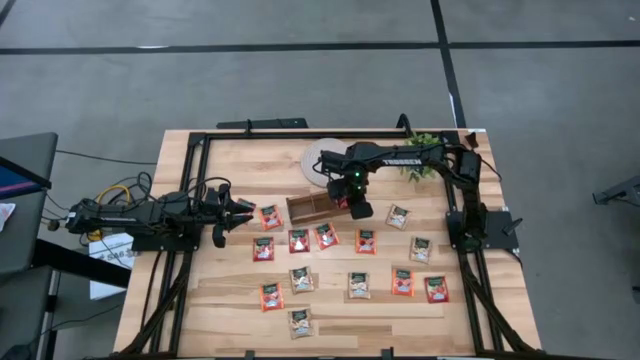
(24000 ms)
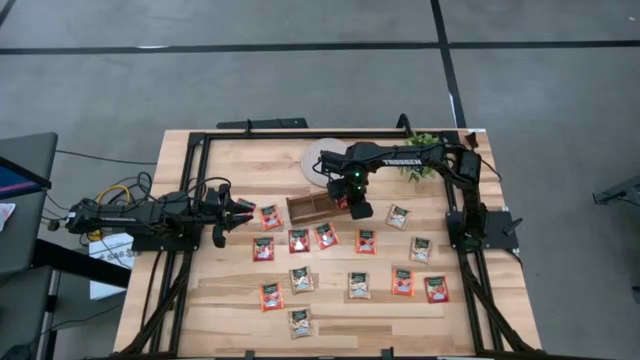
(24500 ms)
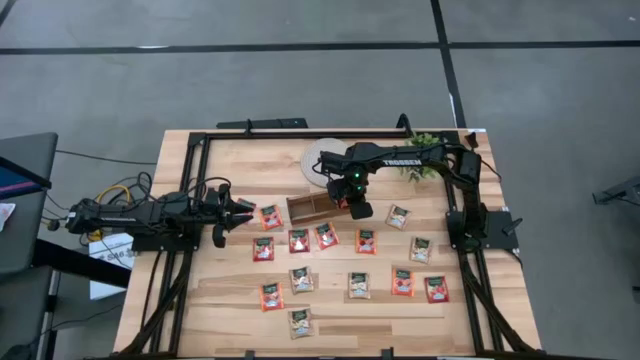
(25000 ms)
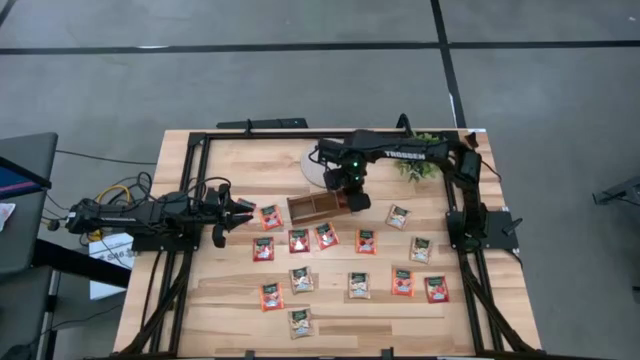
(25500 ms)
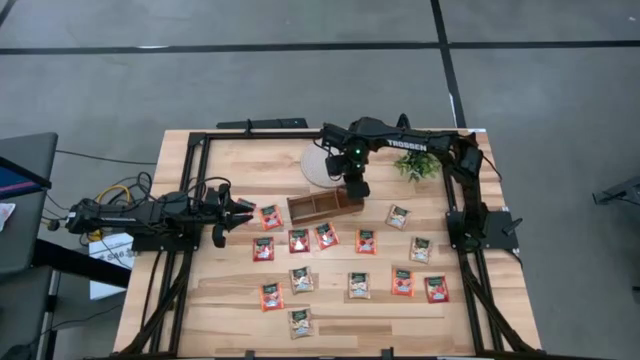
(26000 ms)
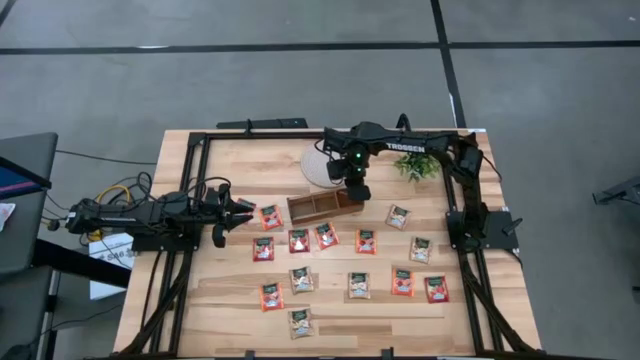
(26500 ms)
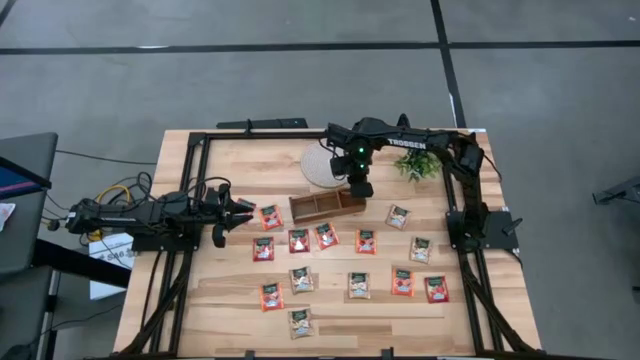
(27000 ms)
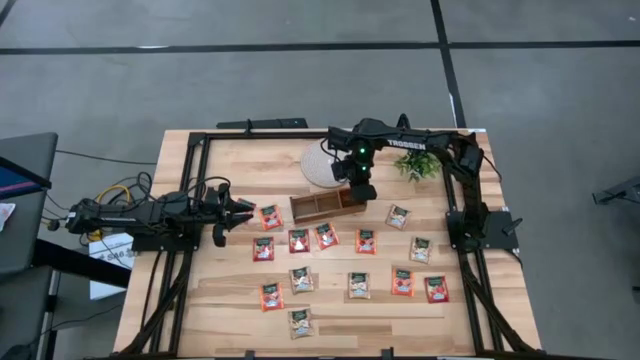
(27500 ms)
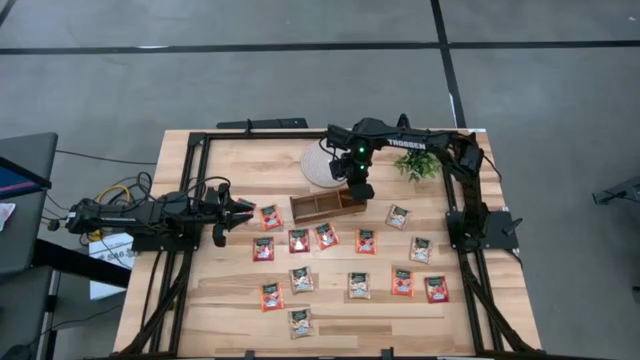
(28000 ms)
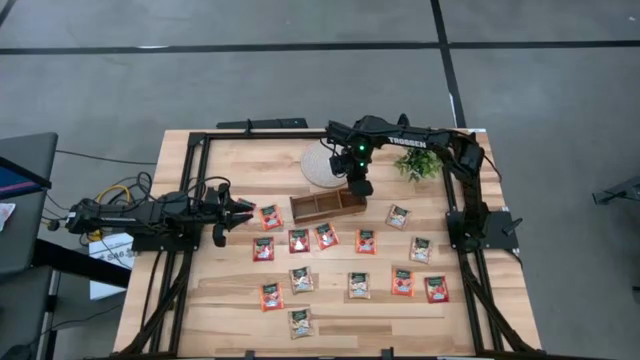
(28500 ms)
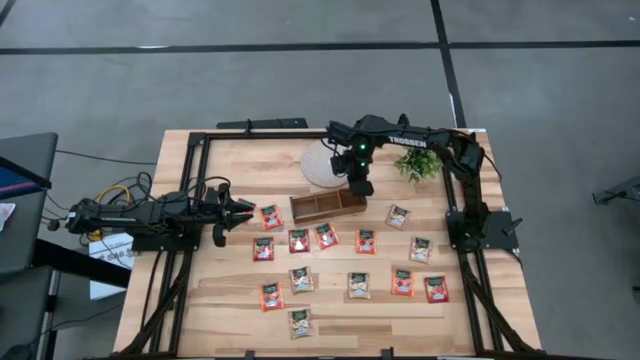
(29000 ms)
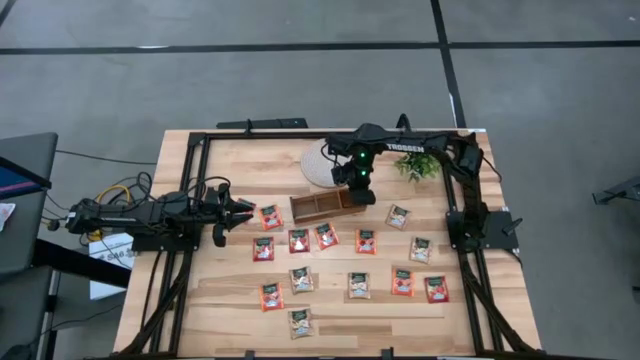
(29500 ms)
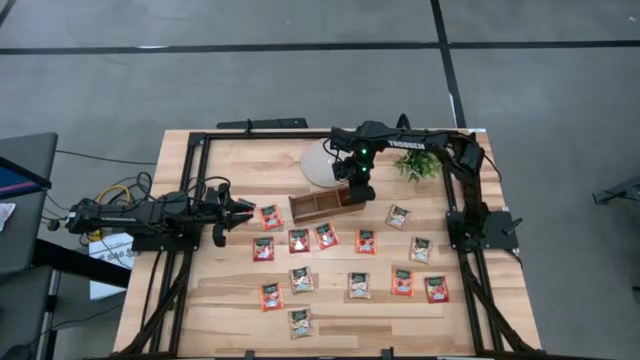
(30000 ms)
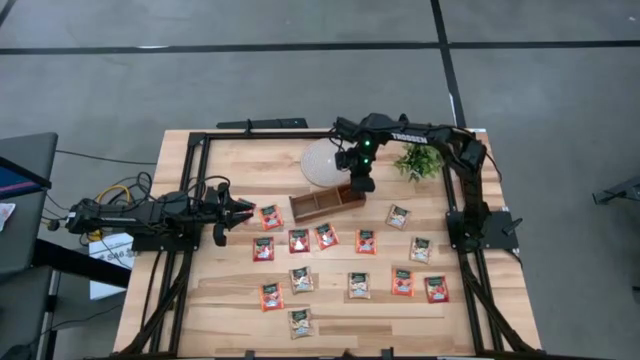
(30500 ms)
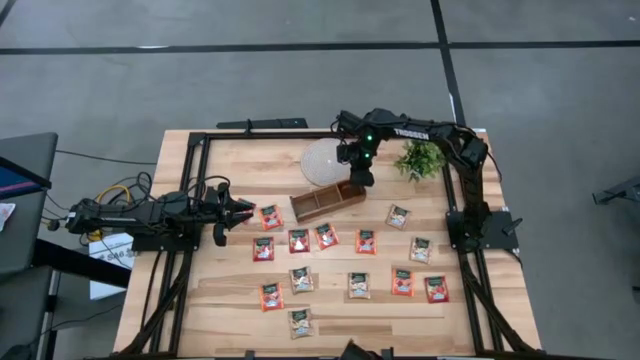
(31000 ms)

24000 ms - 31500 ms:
Task: Pick & Place Tea
Put the red tea bag into the right slot of the wooden organizer

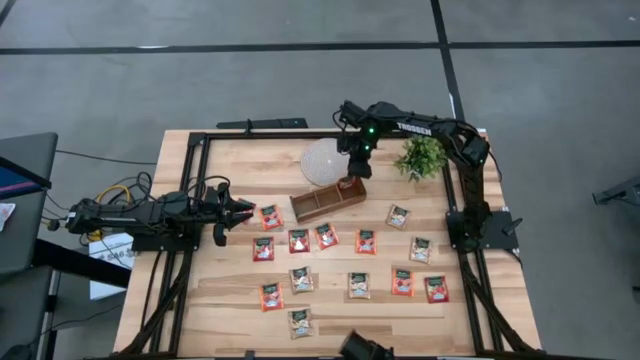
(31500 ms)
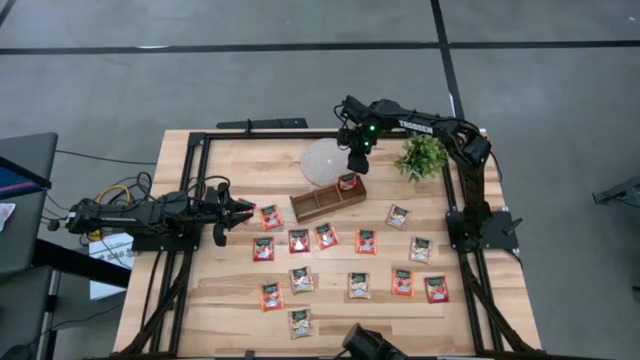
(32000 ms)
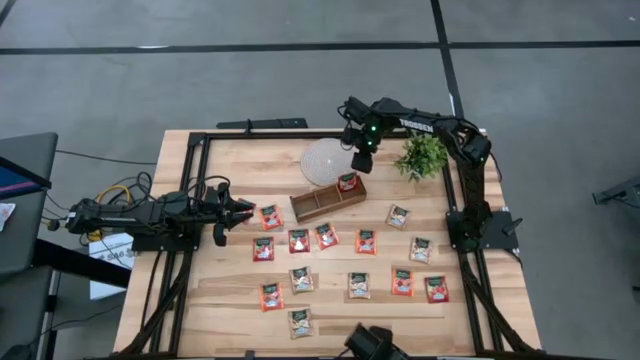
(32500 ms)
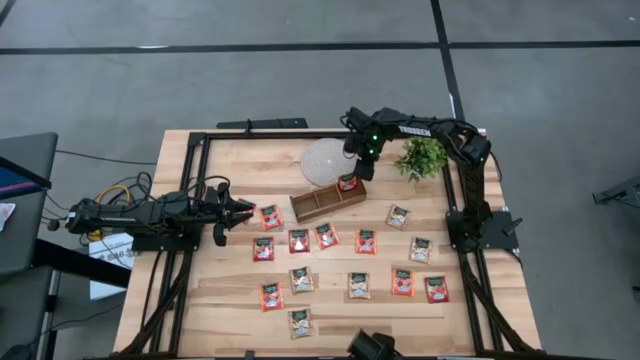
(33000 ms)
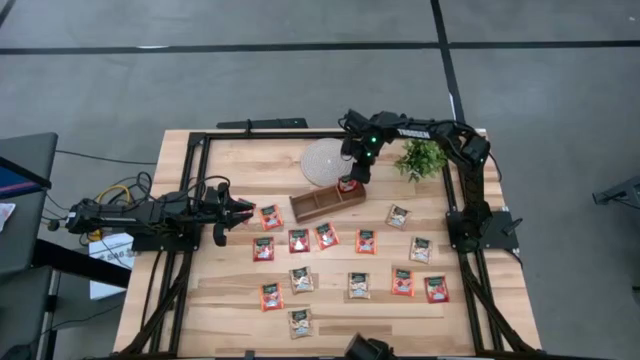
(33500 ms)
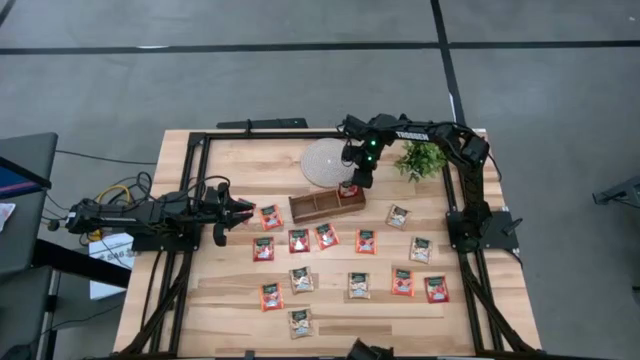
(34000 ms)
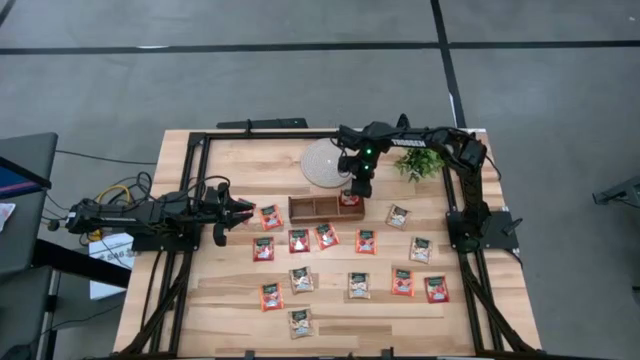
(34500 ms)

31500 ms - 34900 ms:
Adjust the wooden organizer on the table

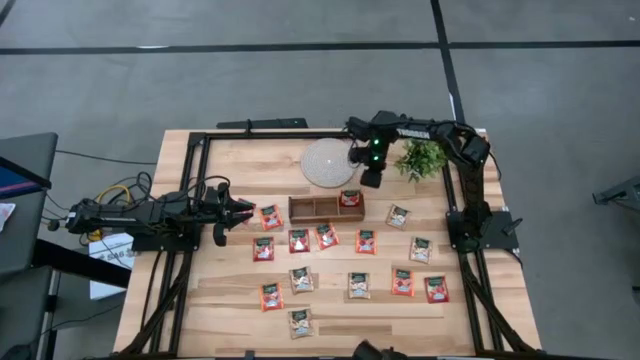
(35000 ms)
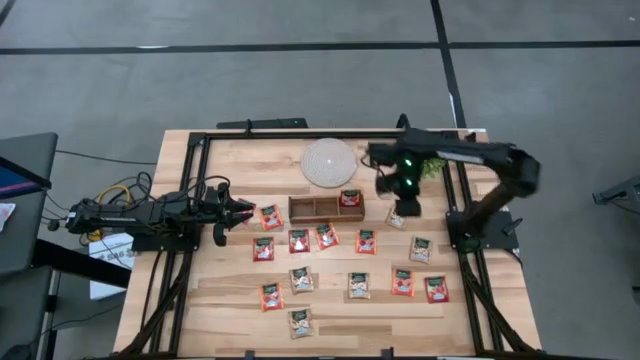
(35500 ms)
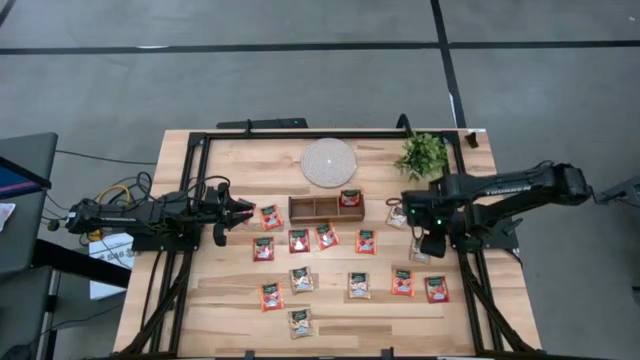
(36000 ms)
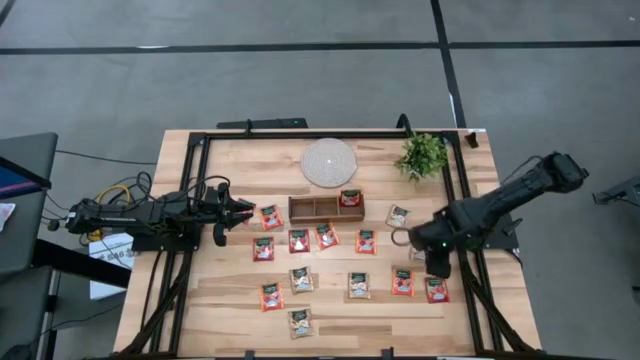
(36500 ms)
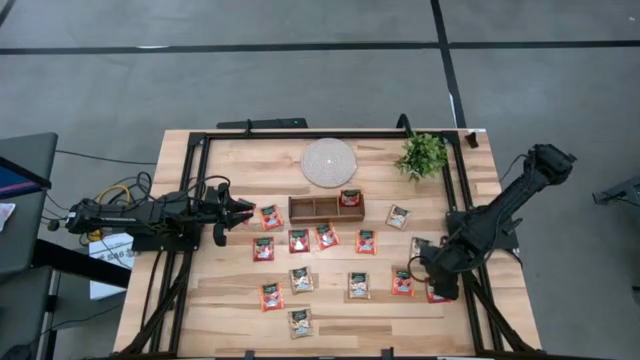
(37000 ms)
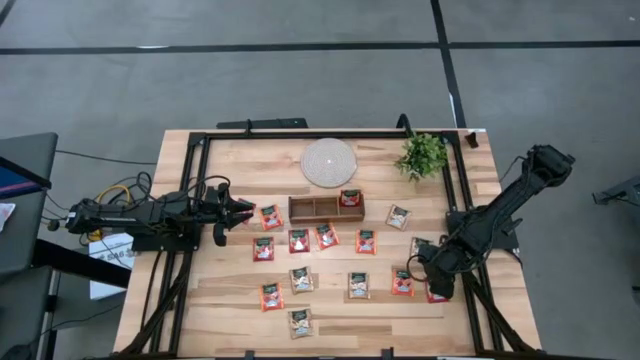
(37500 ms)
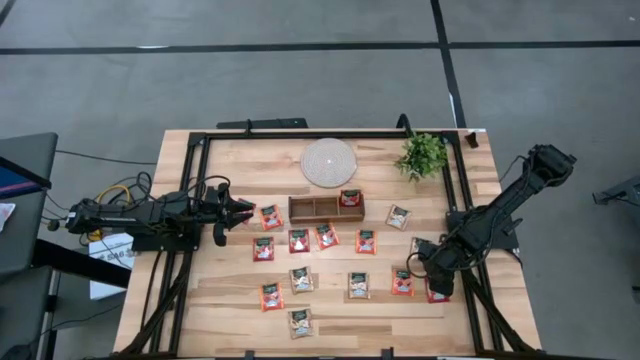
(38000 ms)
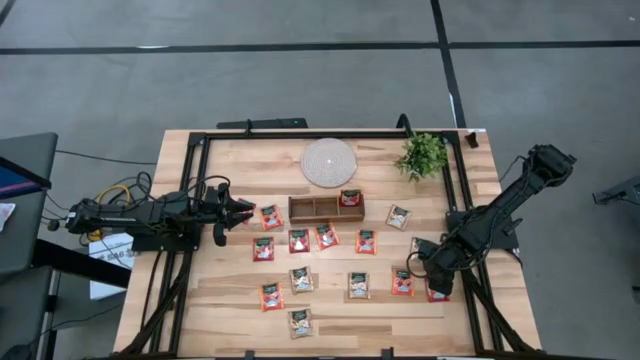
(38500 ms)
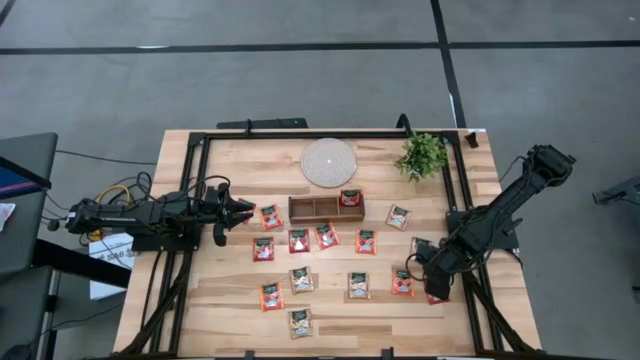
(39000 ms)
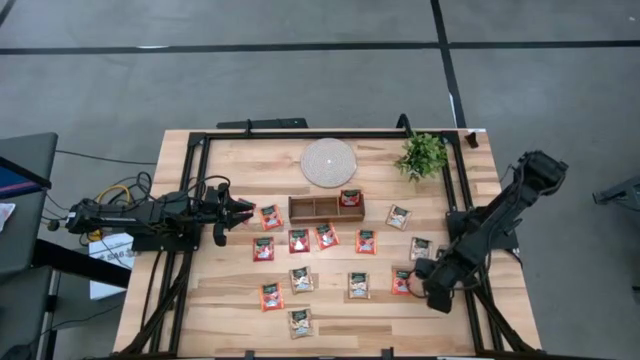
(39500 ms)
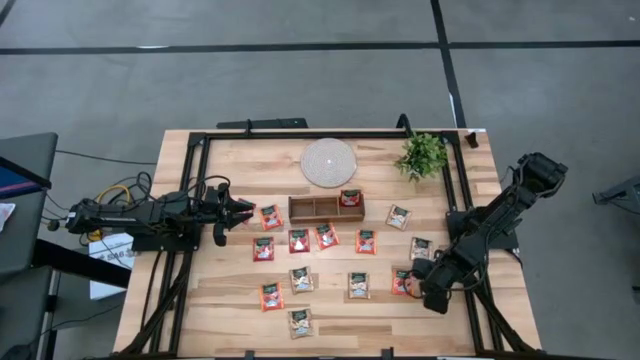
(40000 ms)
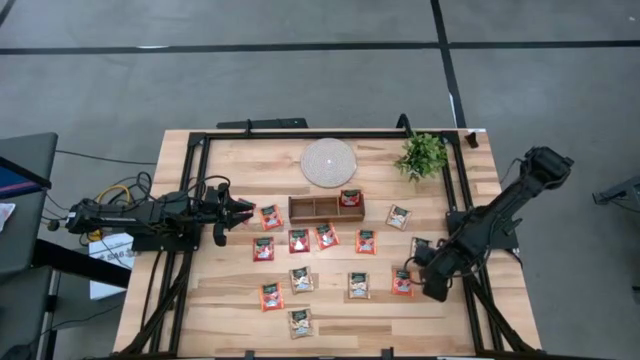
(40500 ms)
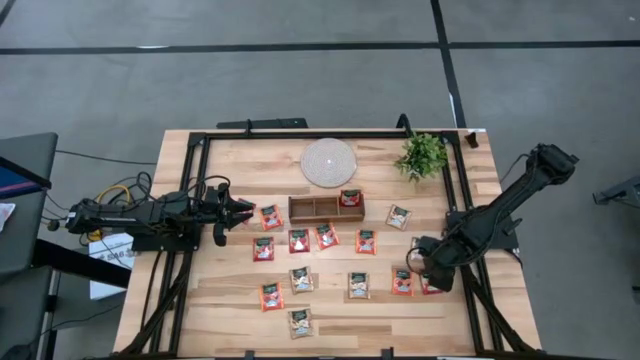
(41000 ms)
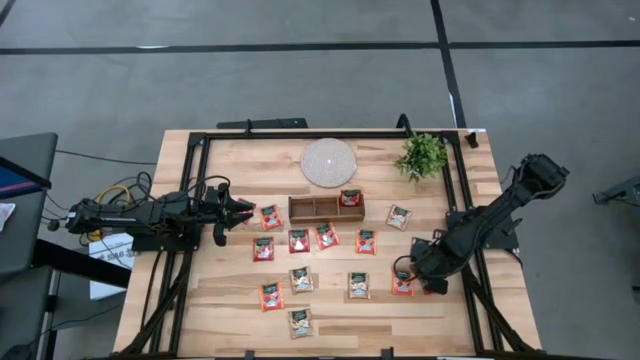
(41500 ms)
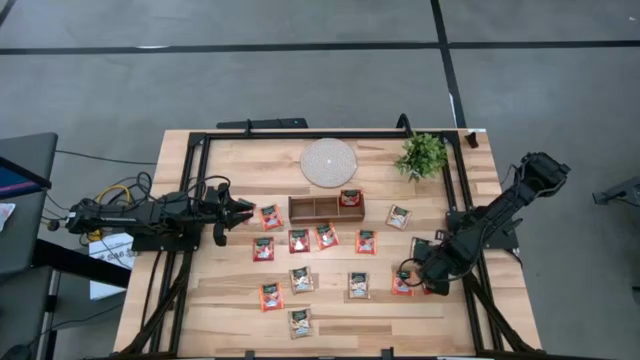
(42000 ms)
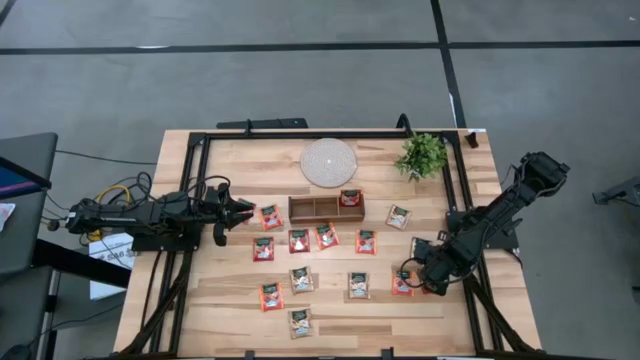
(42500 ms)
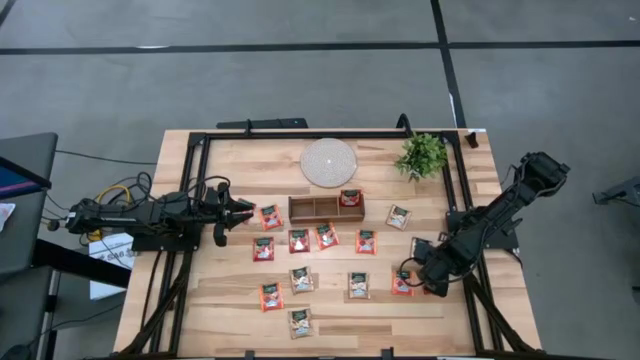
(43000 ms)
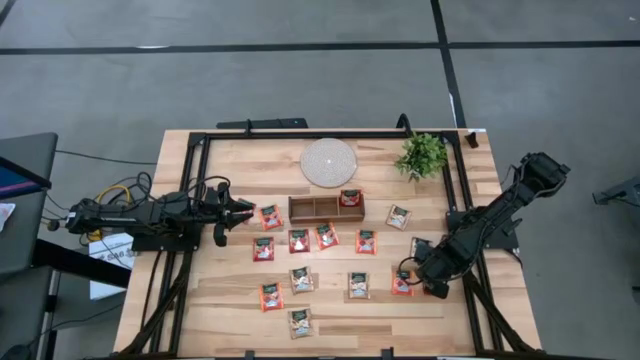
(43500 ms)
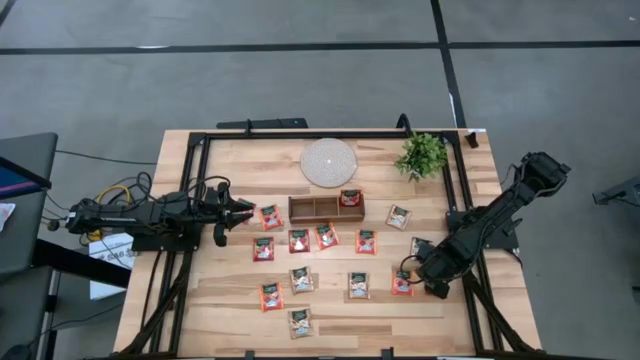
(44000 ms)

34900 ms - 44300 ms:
Put the red tea bag into the right slot of the wooden organizer

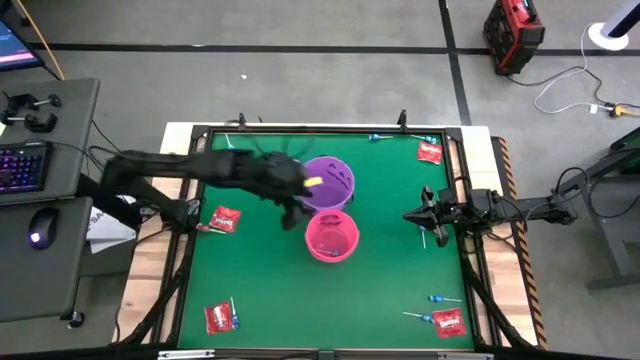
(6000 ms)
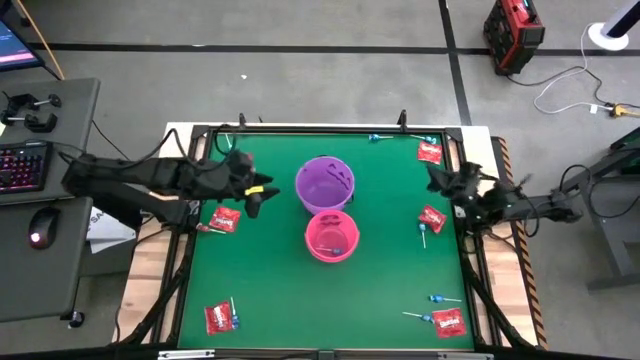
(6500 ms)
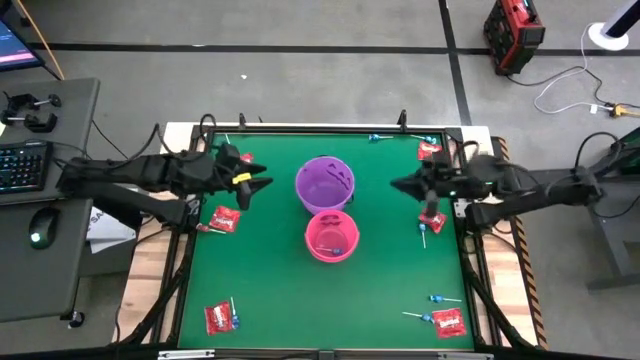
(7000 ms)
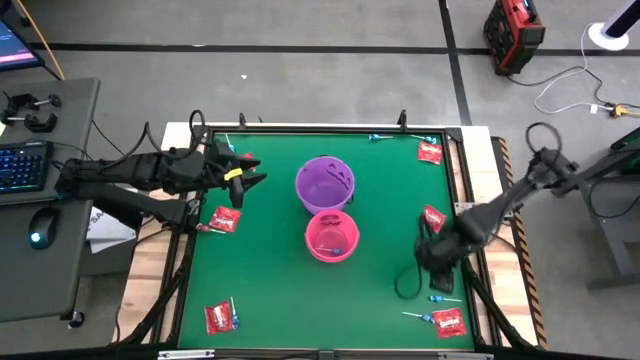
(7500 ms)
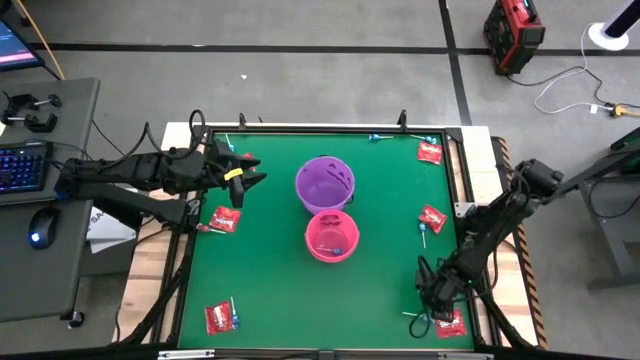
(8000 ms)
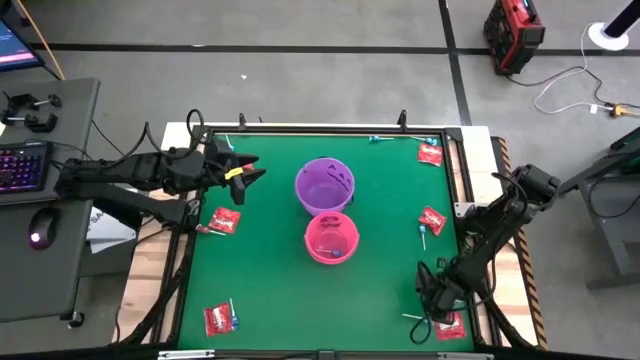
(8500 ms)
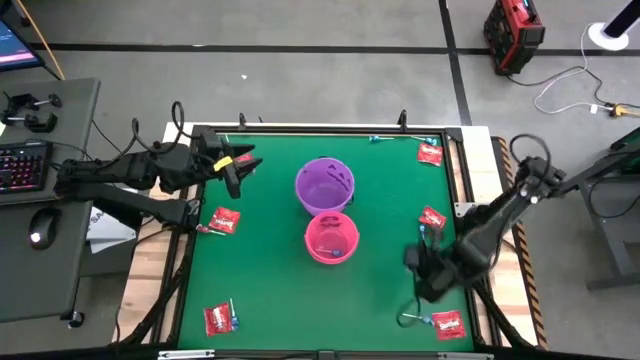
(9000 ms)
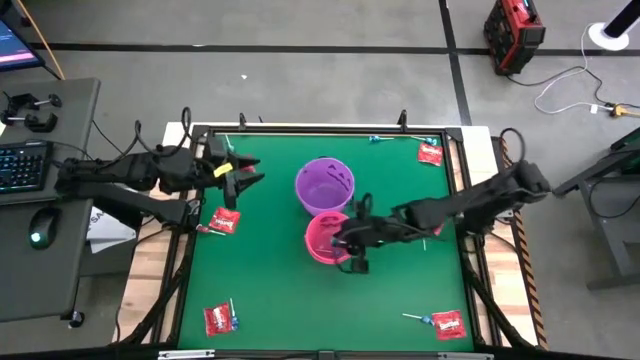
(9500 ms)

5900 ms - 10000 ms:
Task: Sort candy by brand, put in halloween buckets
Put the blue candy into the pink bucket
